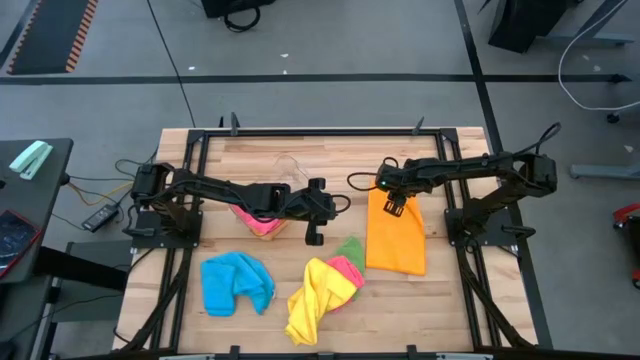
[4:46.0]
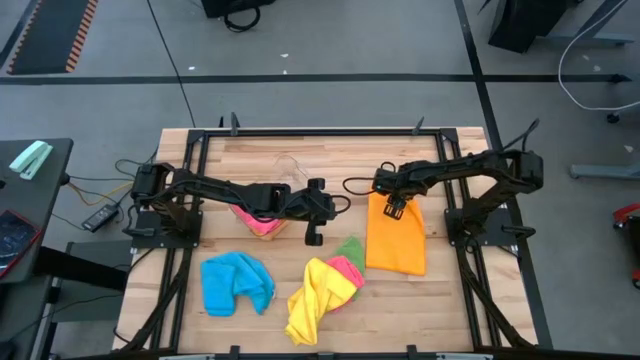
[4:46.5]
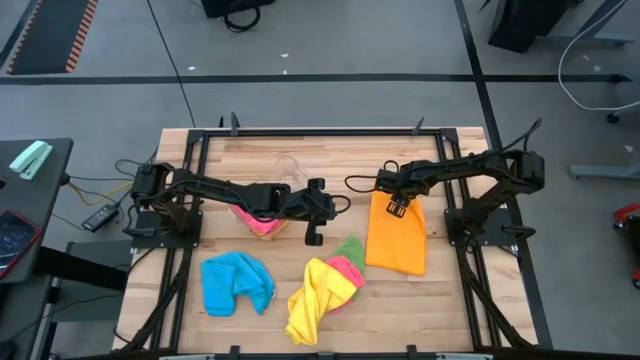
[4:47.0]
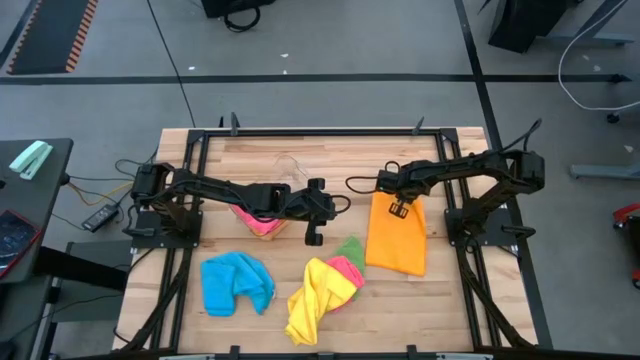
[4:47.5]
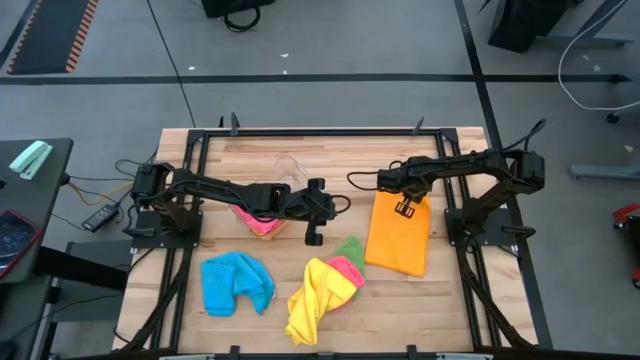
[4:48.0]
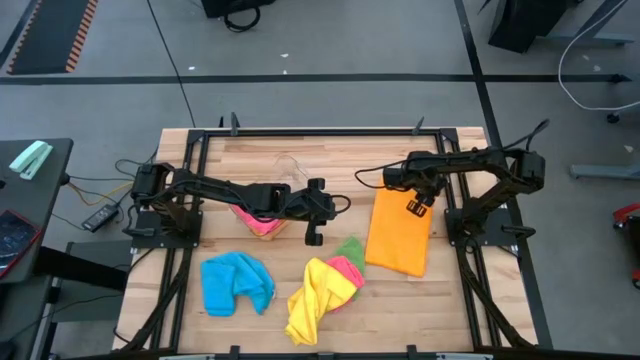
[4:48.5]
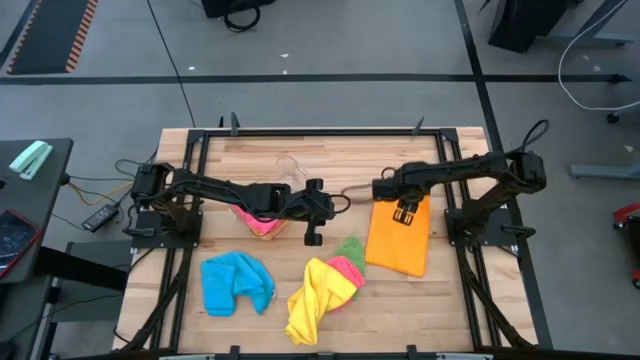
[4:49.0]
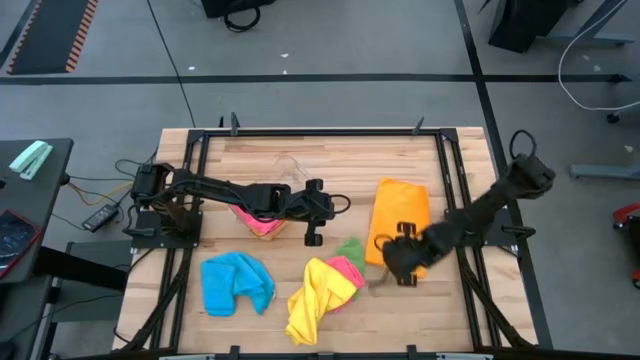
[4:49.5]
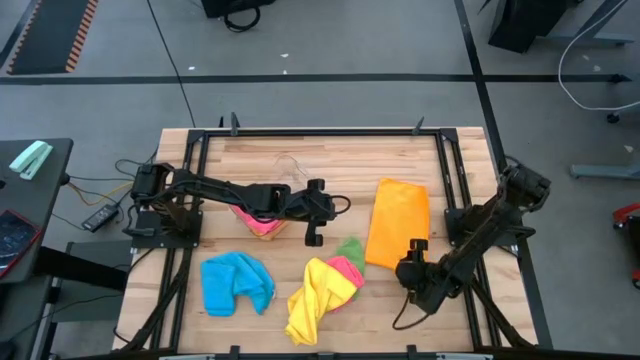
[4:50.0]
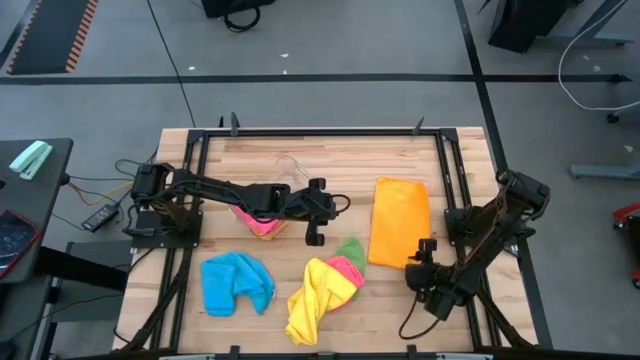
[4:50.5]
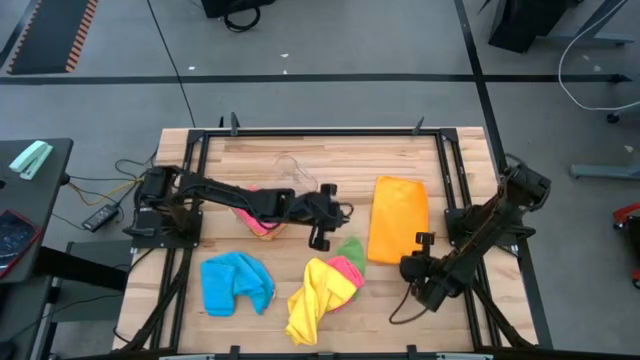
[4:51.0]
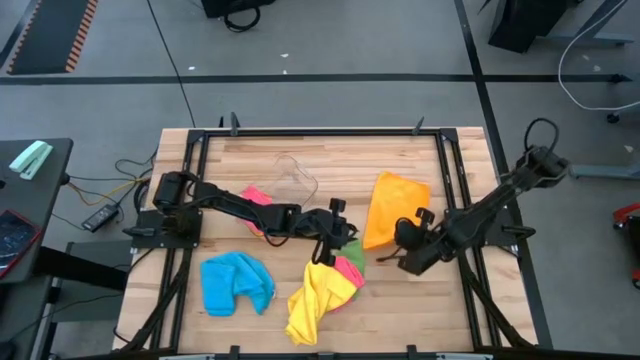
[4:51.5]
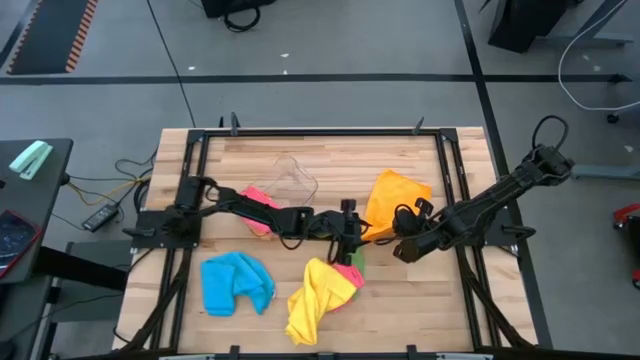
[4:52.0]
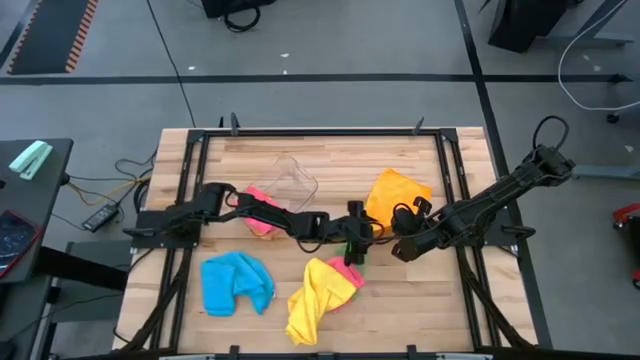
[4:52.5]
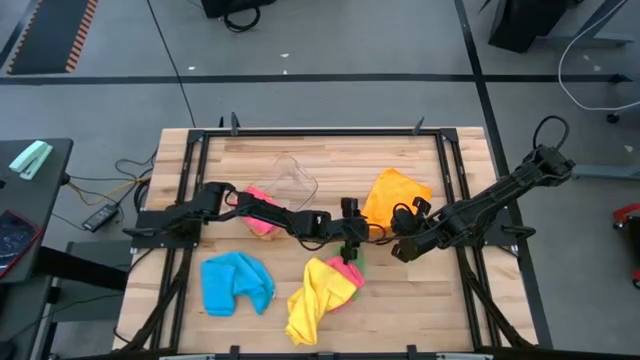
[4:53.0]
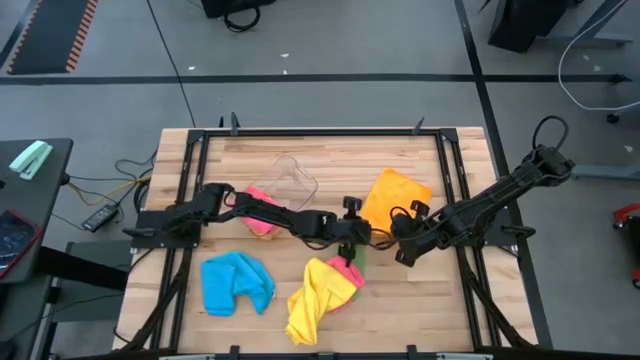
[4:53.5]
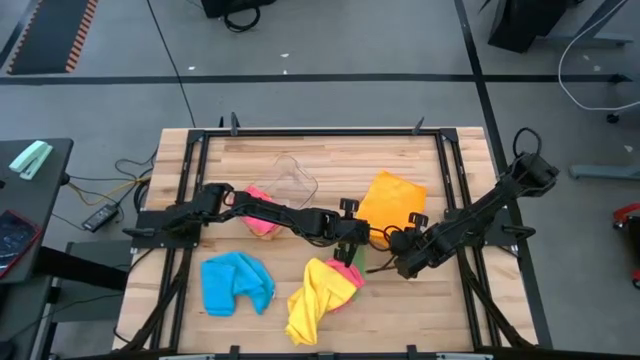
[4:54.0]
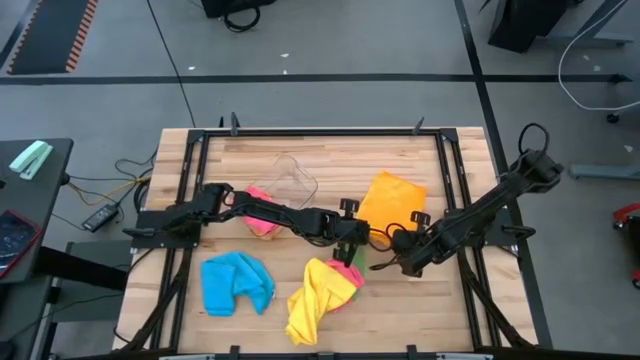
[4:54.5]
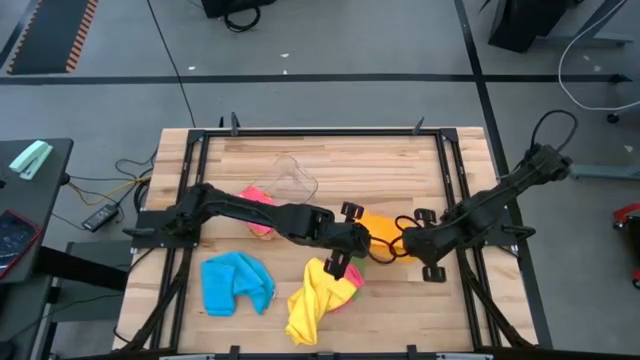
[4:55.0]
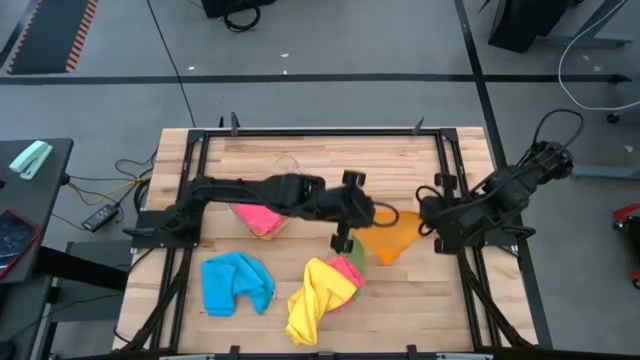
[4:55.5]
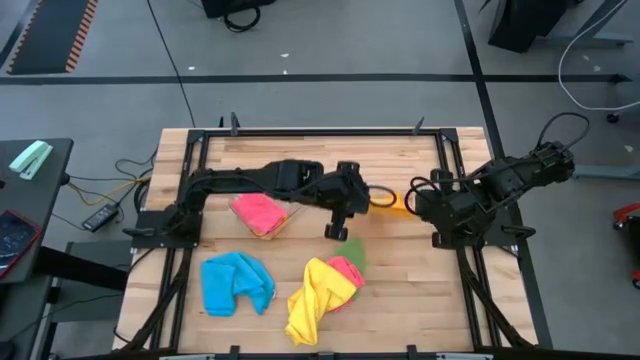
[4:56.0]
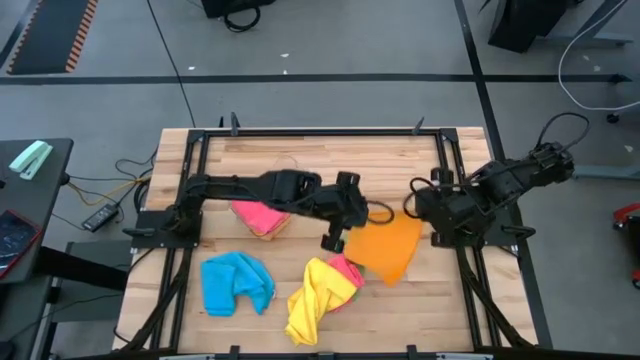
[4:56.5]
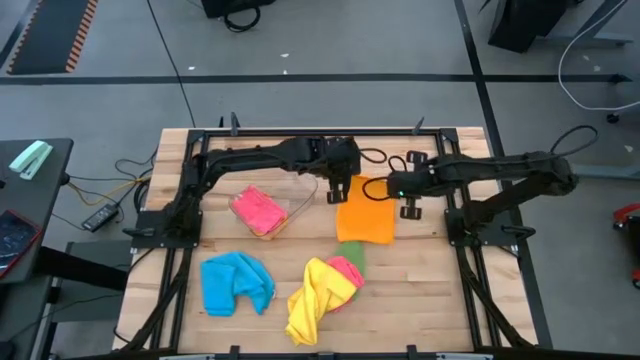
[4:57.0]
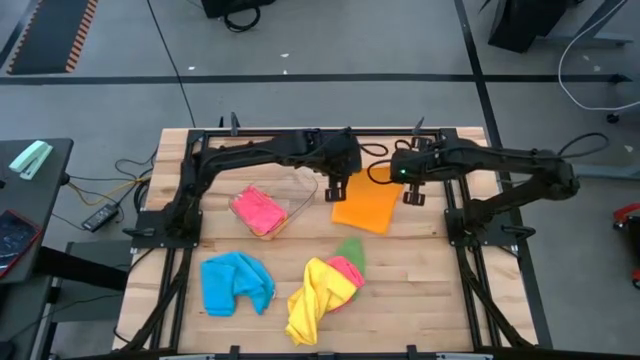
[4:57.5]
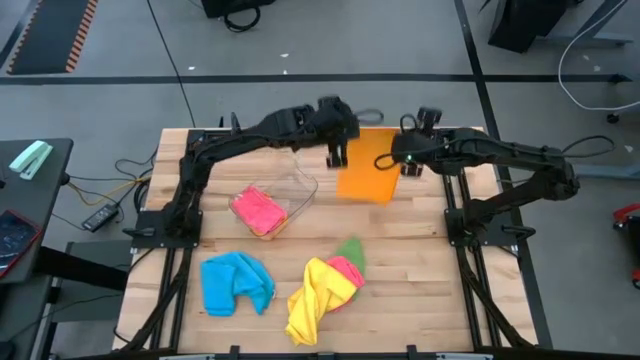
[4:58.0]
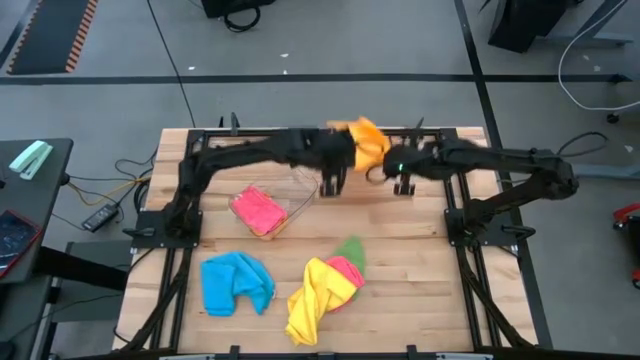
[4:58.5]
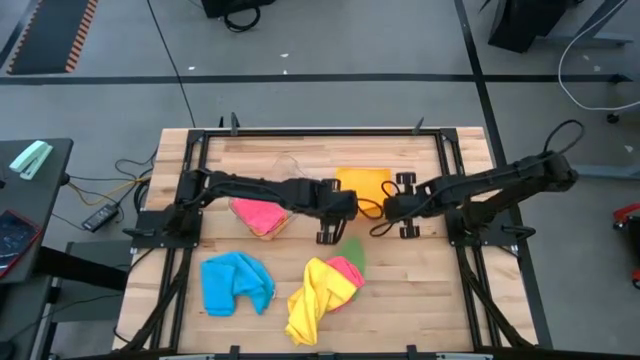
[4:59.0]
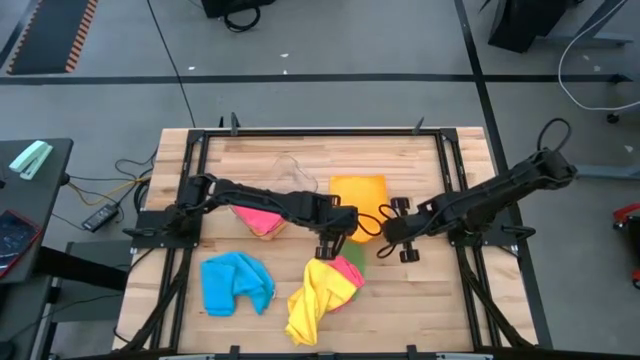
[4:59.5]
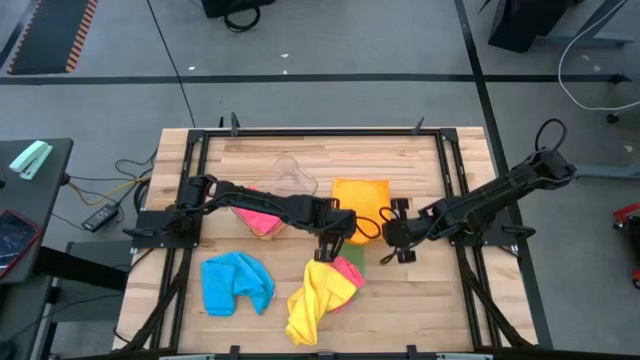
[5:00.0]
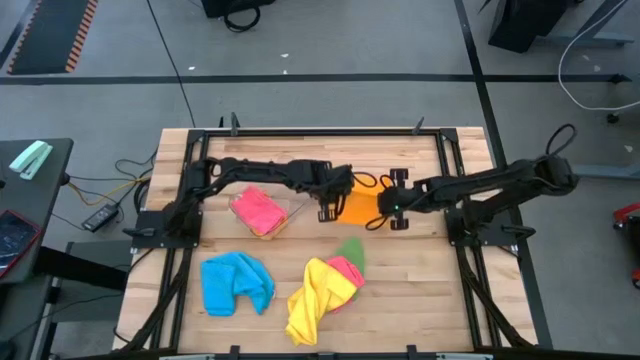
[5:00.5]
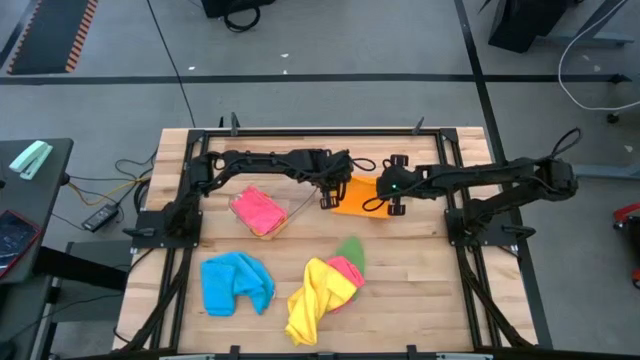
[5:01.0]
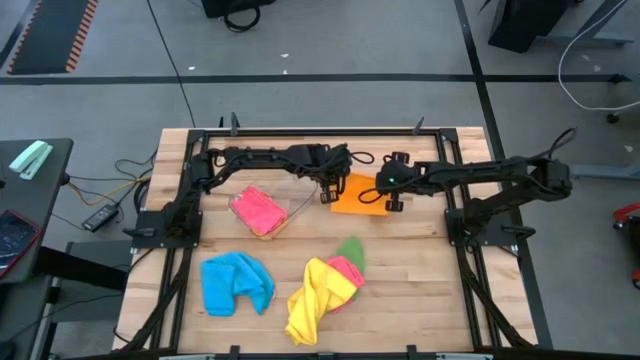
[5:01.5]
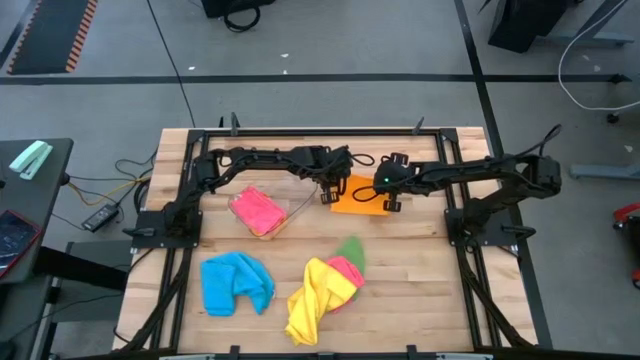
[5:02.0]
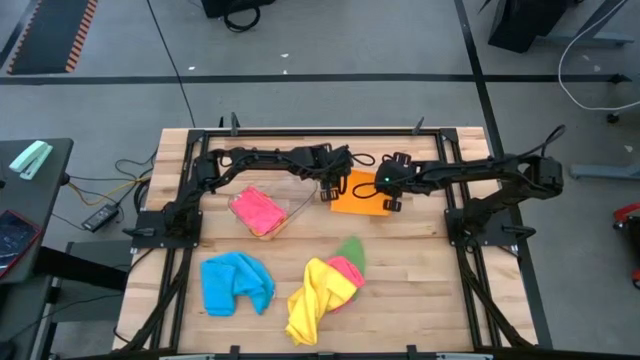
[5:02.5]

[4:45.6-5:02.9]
Task: Fold microfiber towels
Fold the orange microfiber towel
